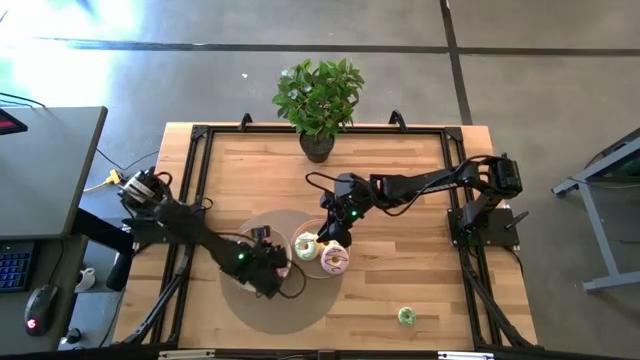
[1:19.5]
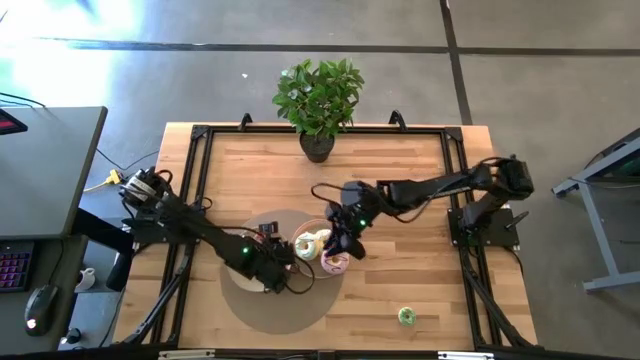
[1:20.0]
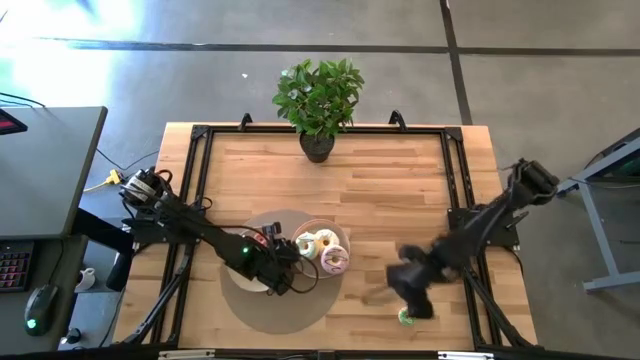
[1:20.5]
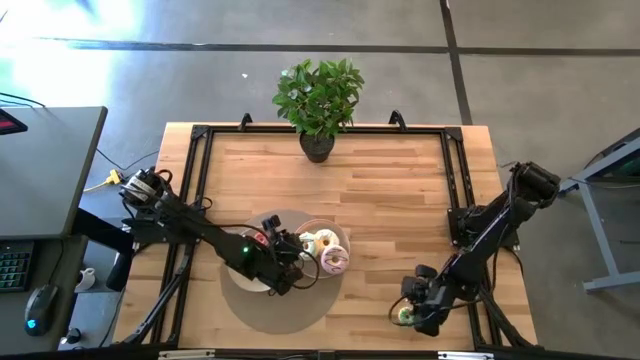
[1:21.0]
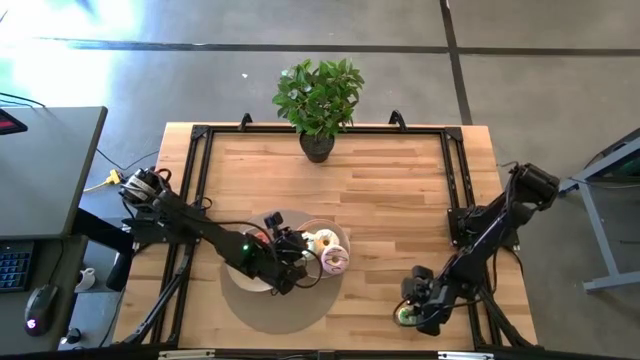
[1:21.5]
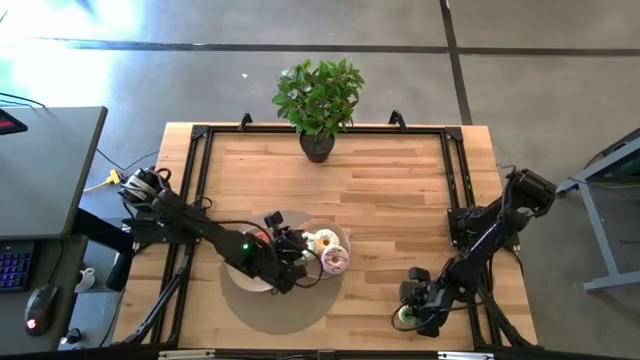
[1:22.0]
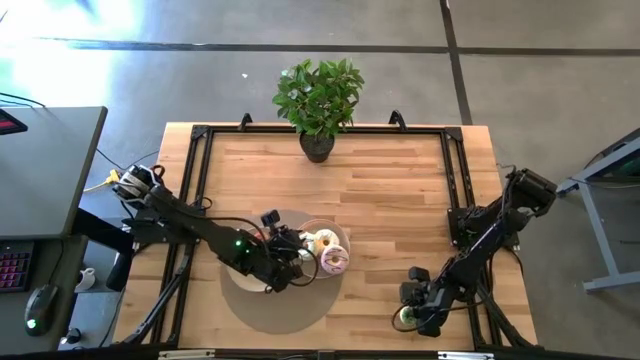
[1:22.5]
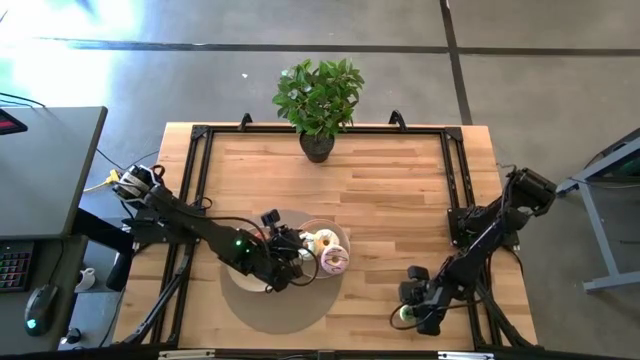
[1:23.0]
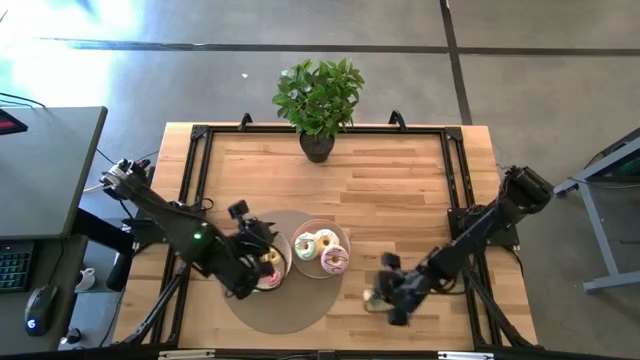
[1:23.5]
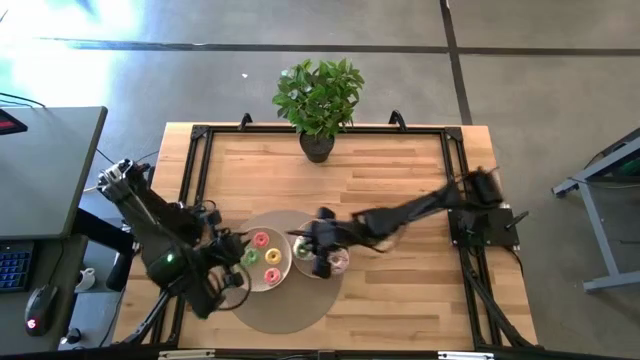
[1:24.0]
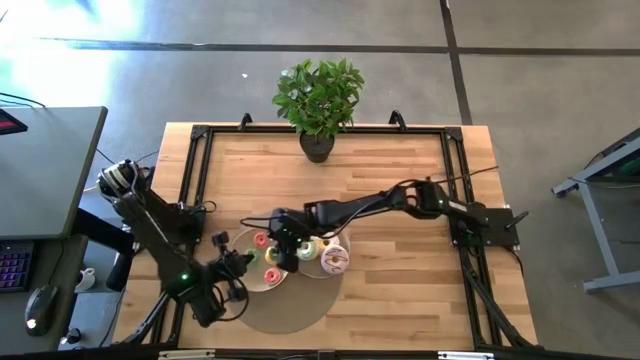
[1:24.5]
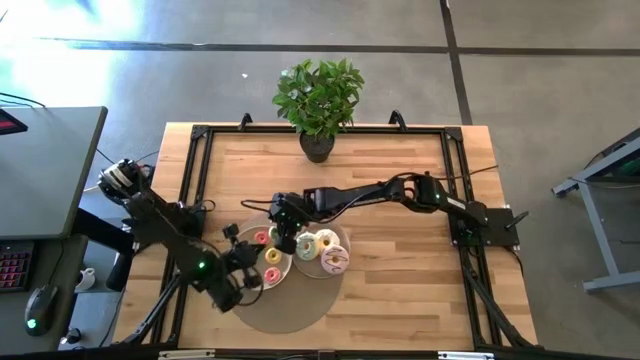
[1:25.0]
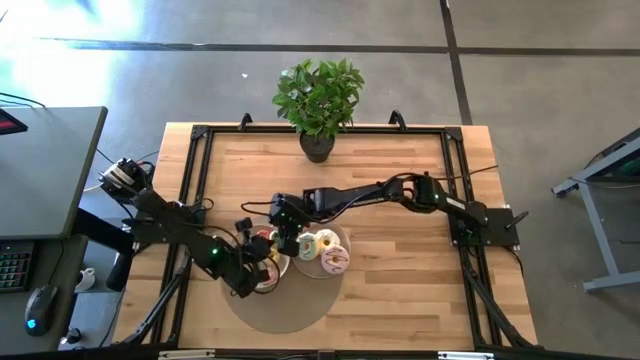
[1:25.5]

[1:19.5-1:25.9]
Task: Pick & Place donuts
Put the small green donut on the left white plate

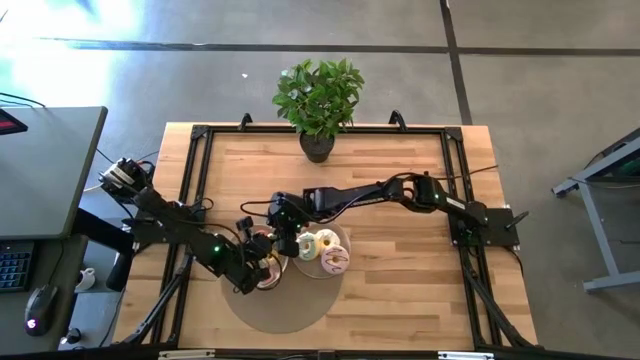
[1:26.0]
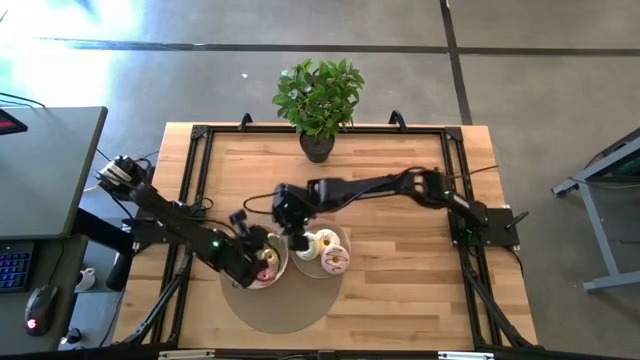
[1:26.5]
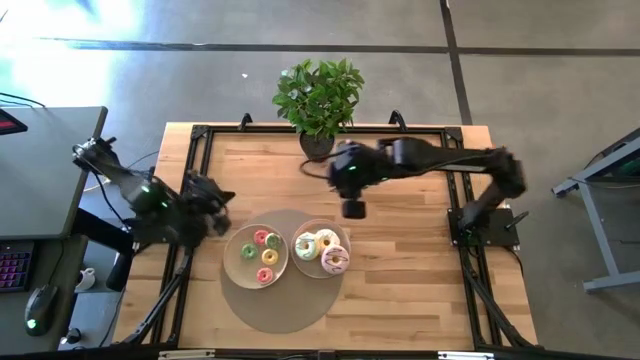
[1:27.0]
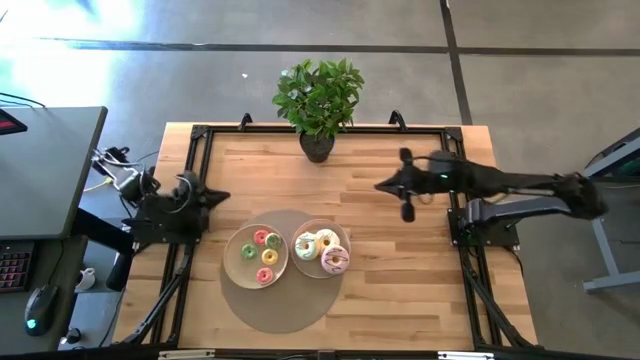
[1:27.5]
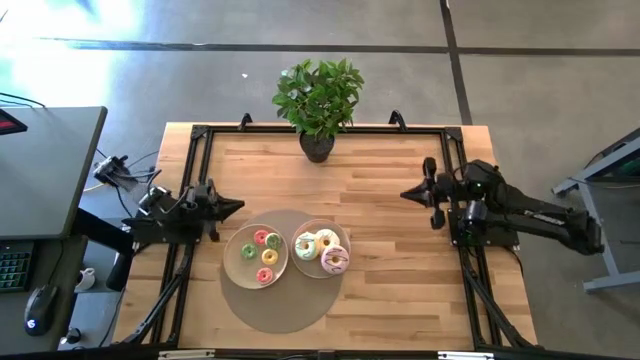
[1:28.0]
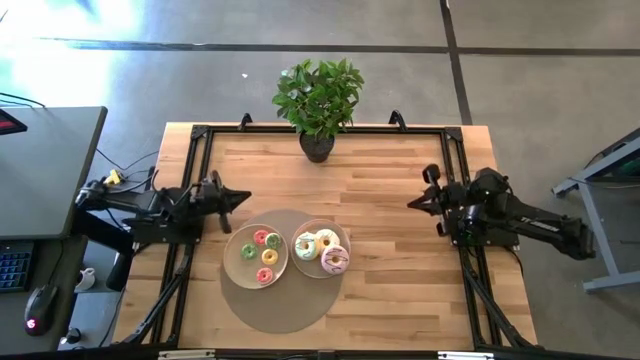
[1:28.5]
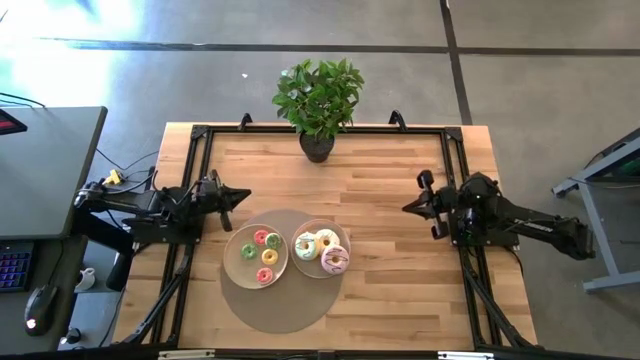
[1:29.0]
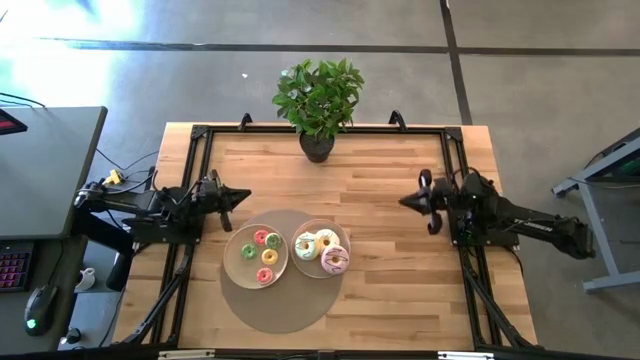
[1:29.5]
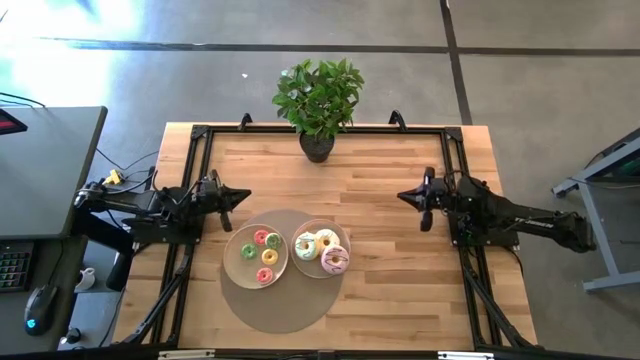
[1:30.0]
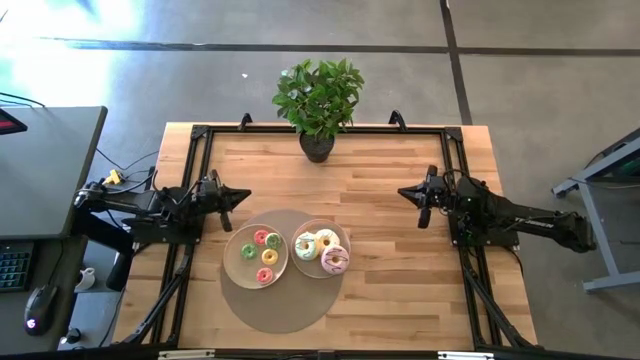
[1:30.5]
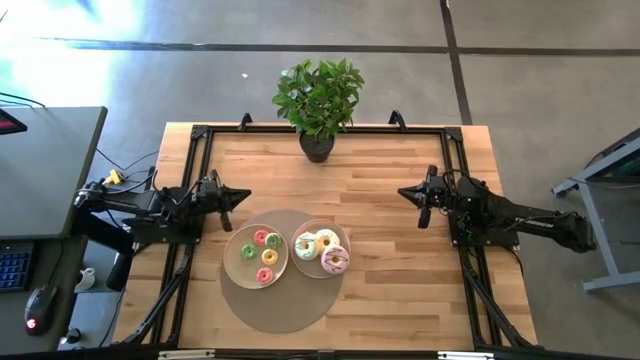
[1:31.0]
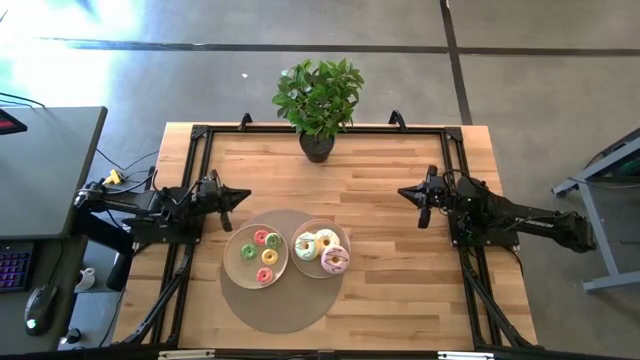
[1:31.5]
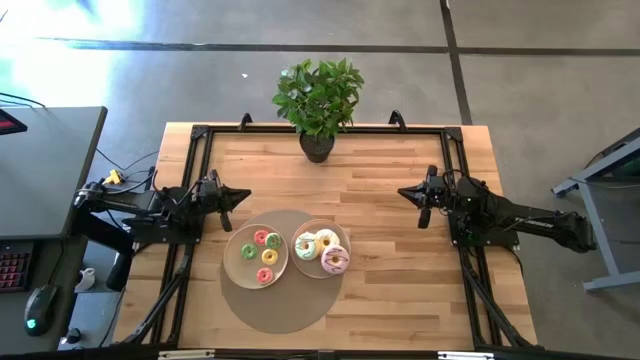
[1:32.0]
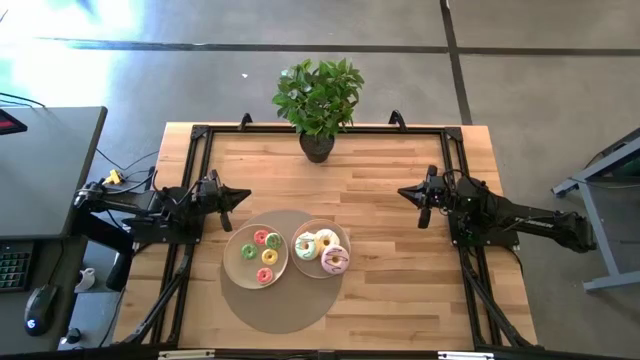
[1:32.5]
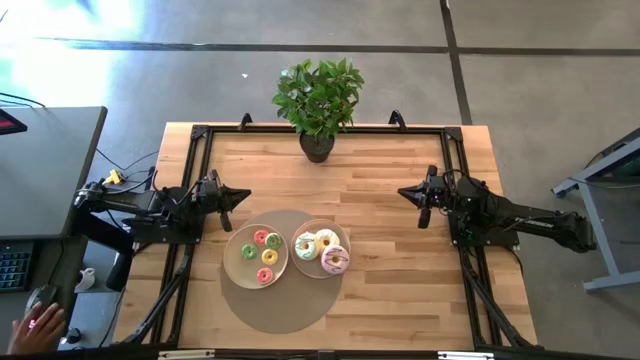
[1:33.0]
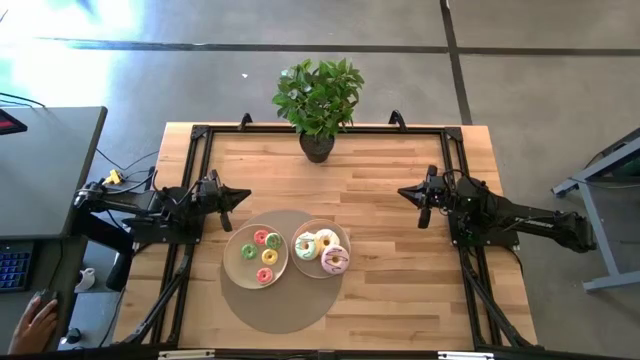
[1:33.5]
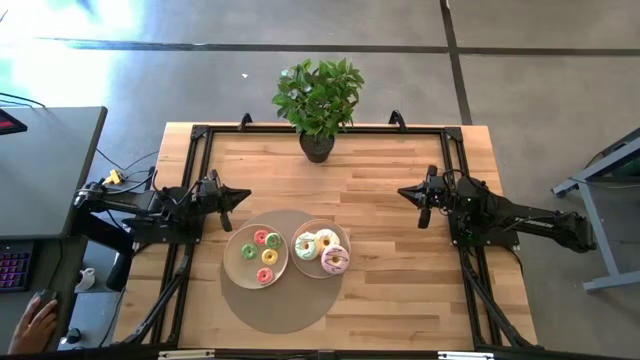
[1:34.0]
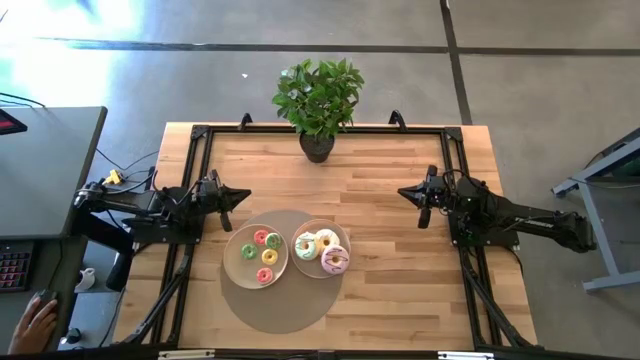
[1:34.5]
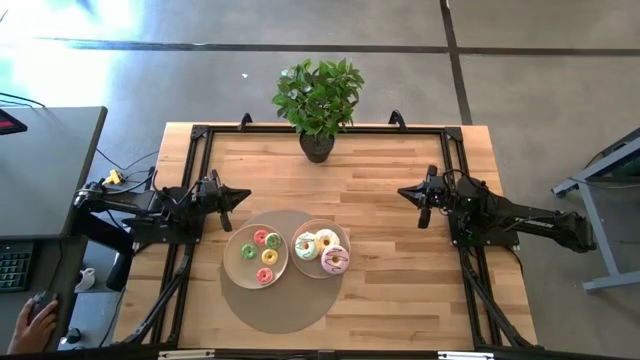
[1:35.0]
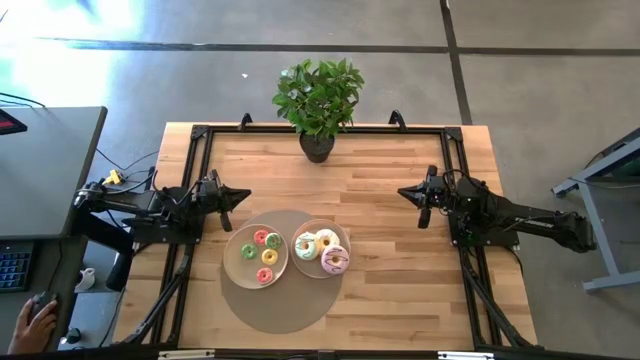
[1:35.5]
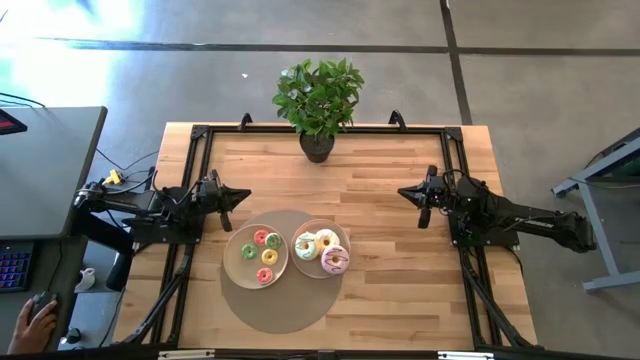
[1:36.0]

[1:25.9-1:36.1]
Return to Home Position

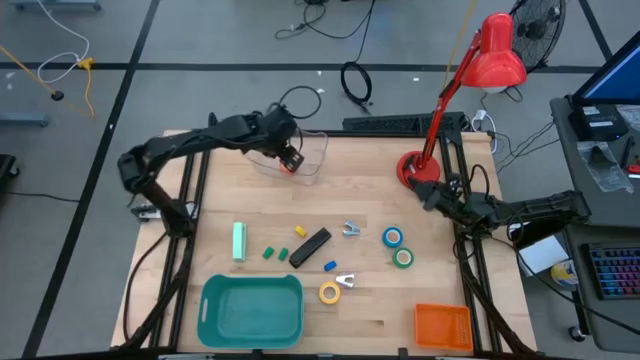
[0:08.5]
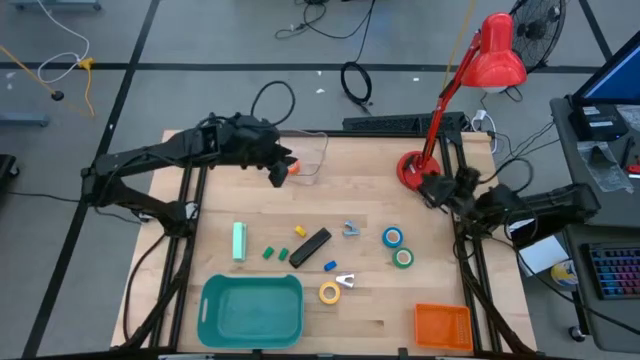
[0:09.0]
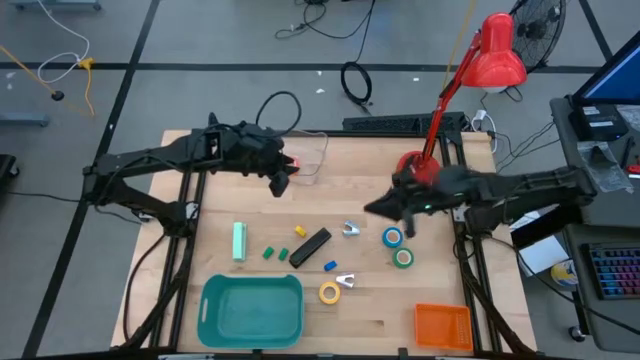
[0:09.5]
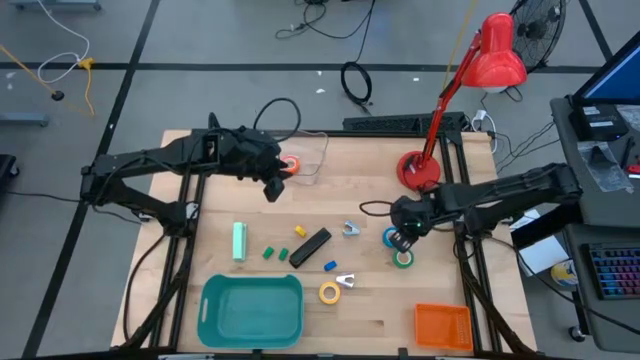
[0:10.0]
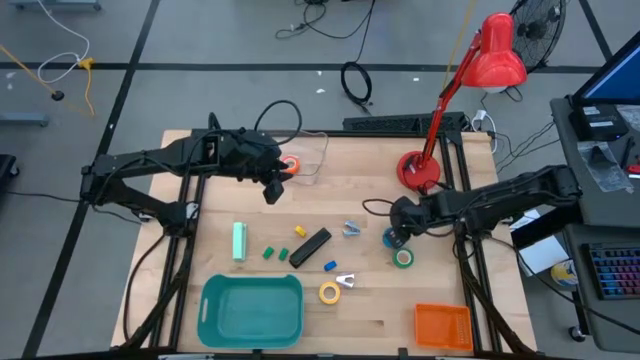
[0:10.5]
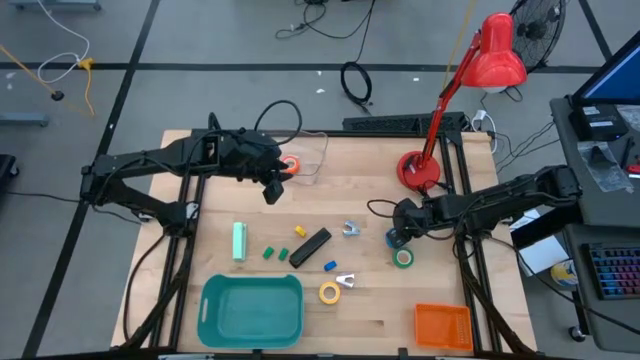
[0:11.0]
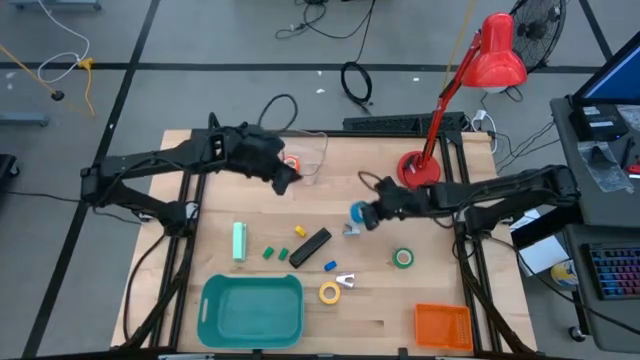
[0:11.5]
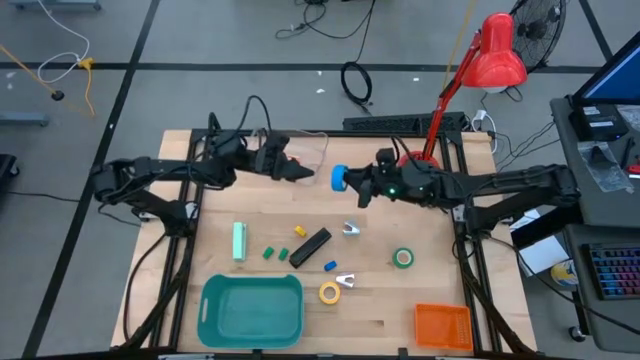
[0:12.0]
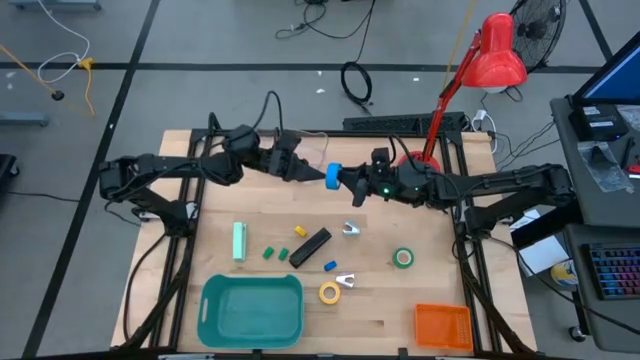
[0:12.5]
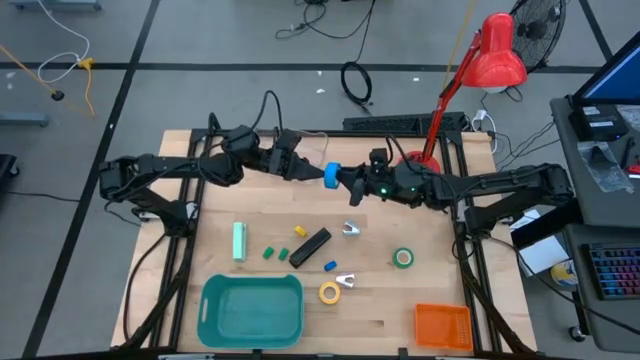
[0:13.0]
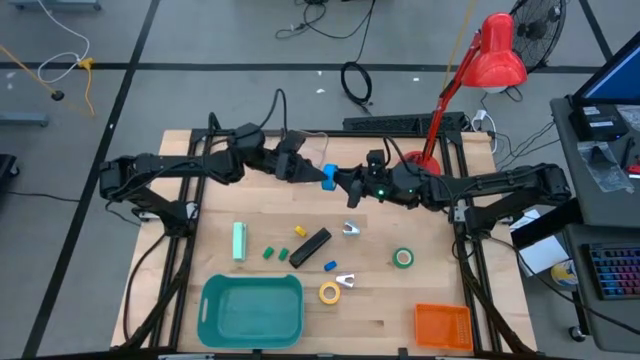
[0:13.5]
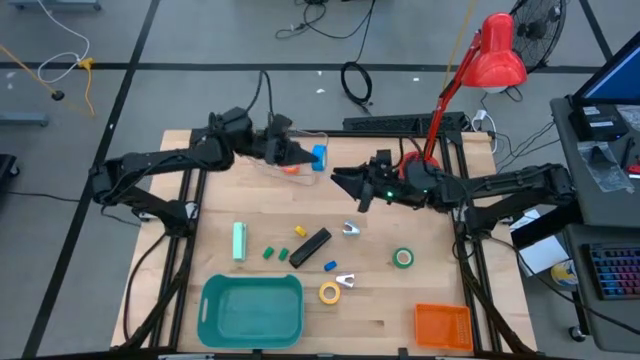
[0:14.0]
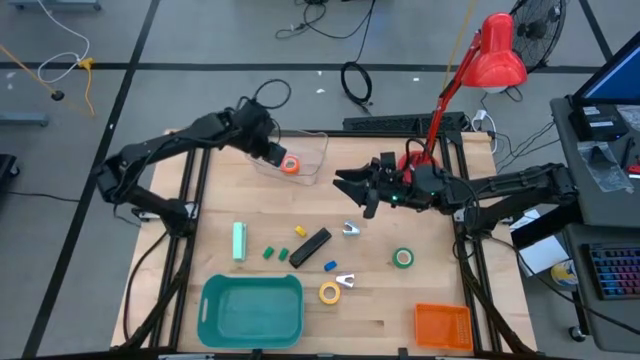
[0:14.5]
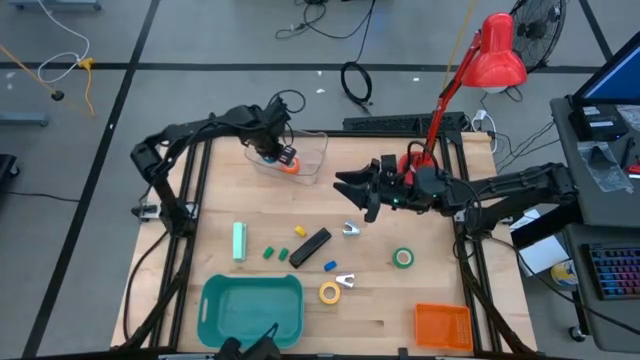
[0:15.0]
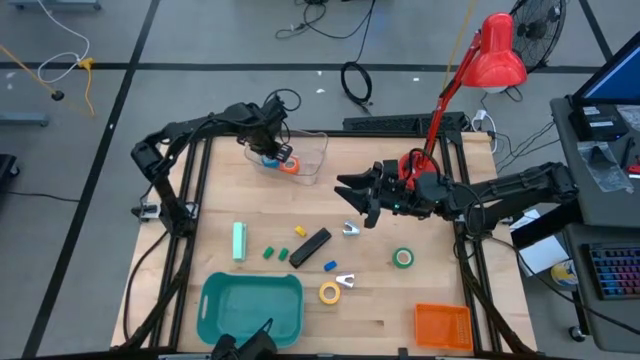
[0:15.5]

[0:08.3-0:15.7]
Task: Pick and place Stapler, Stapler remover, tape
Put the blue tape into the transparent bin
